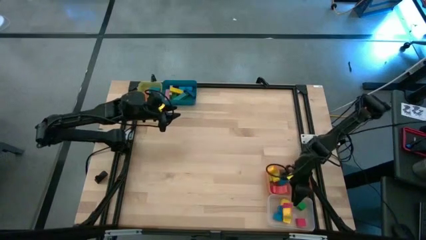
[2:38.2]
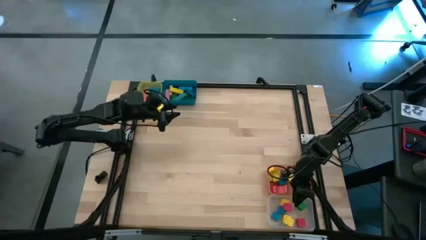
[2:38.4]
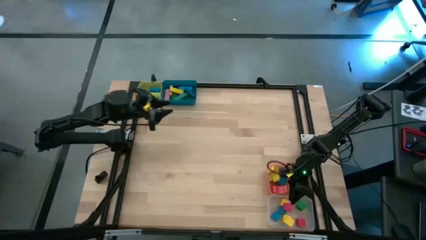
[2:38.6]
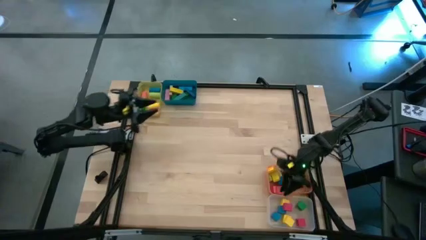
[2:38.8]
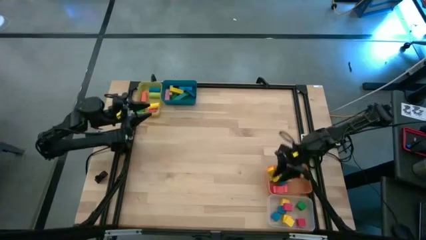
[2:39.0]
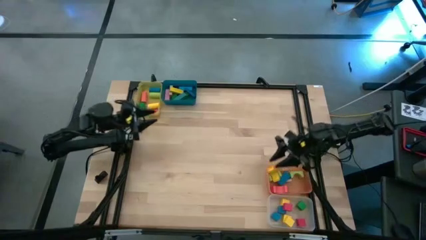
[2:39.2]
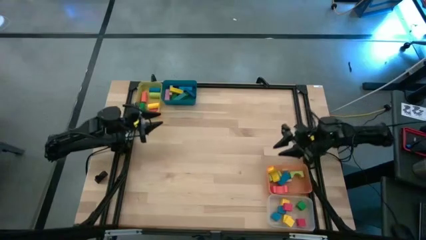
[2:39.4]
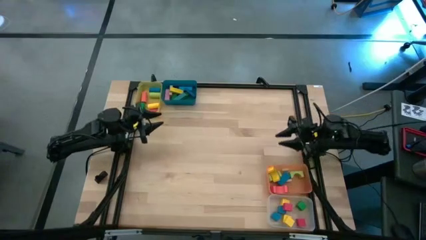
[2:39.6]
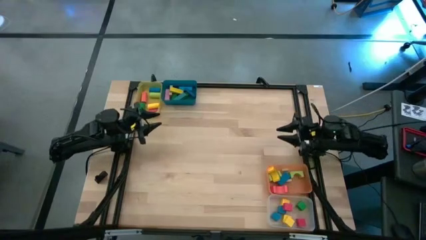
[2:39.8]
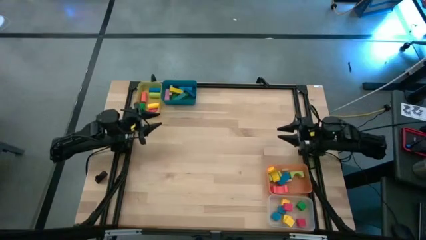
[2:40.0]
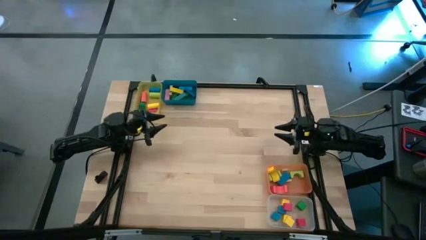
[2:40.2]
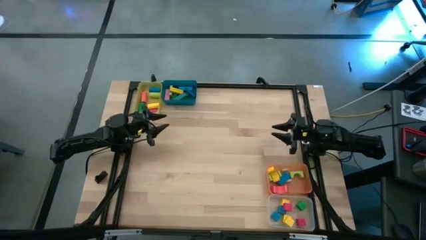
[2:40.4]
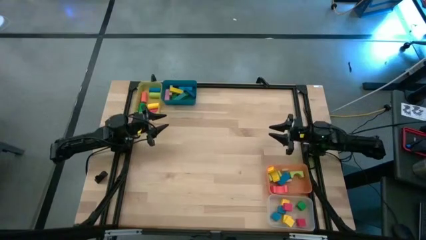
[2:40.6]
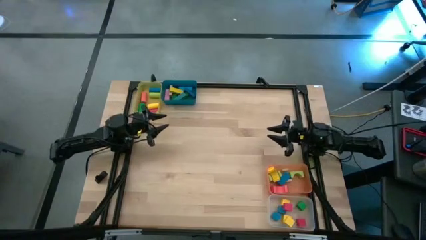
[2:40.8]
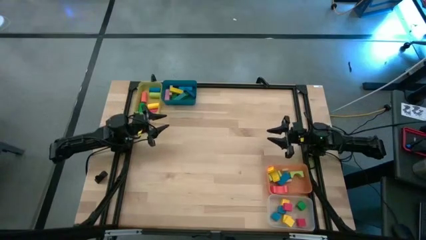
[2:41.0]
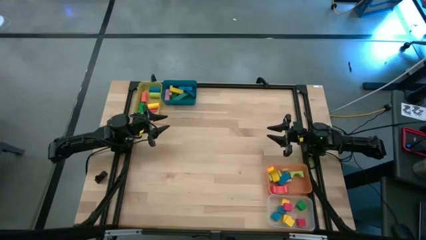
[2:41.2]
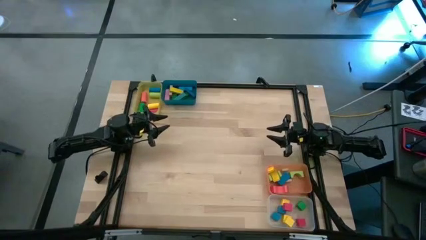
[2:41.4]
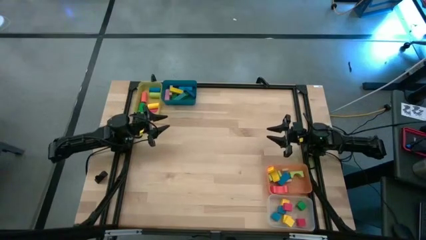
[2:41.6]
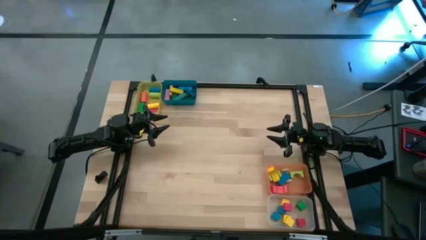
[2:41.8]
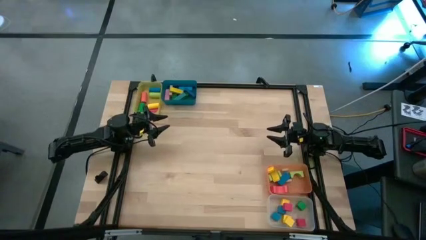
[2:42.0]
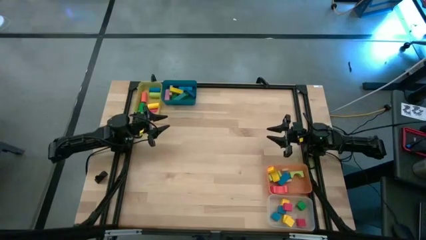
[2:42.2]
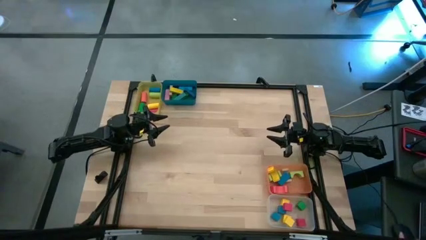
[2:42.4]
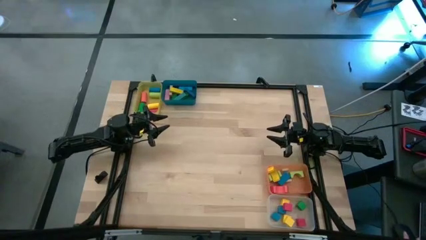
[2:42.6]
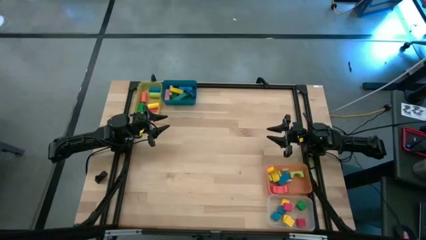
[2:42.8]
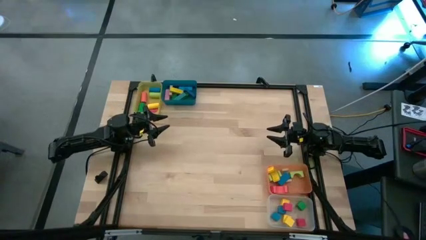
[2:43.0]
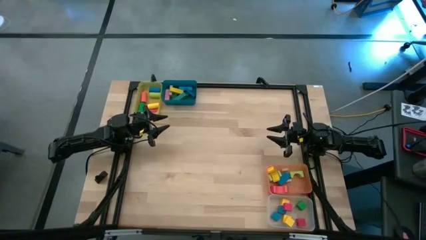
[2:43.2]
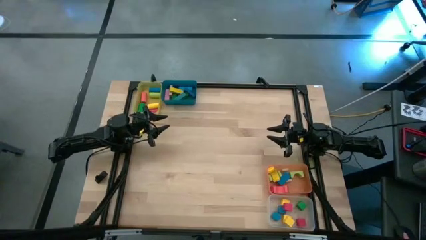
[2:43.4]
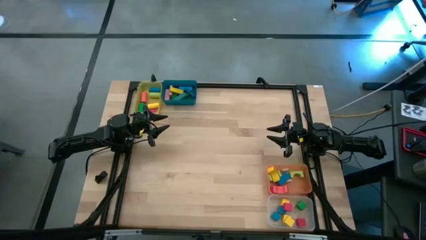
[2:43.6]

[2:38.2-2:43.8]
Task: Sort blocks by size
Return to Home Position

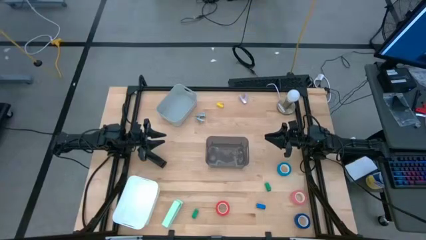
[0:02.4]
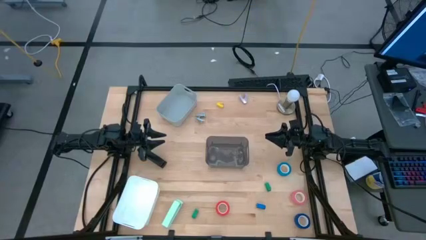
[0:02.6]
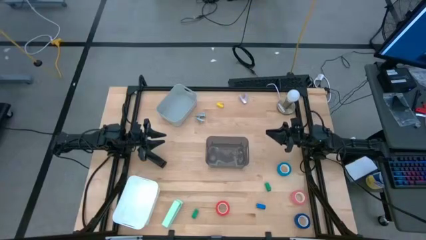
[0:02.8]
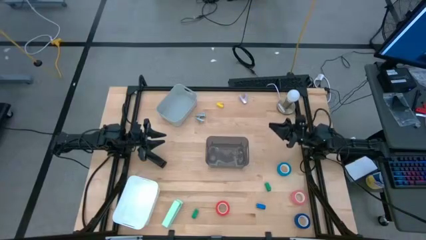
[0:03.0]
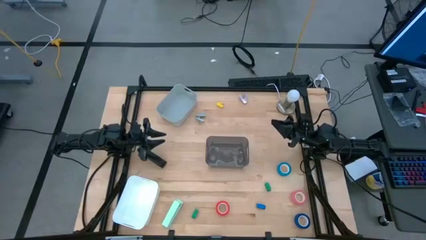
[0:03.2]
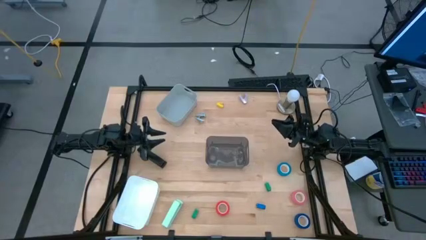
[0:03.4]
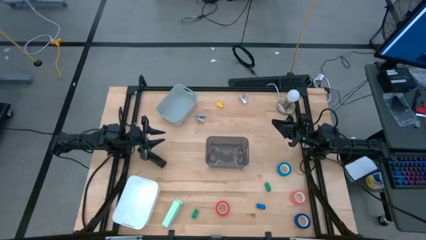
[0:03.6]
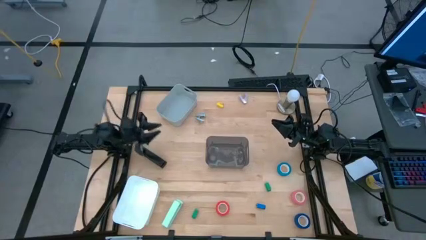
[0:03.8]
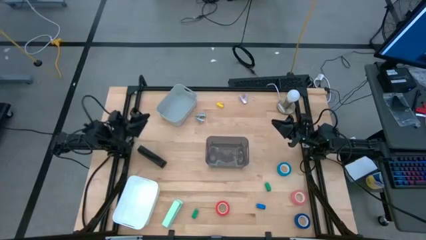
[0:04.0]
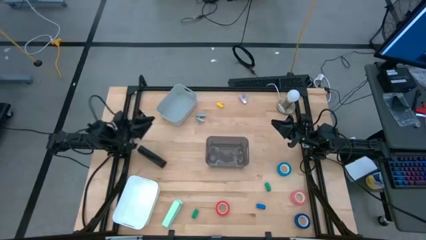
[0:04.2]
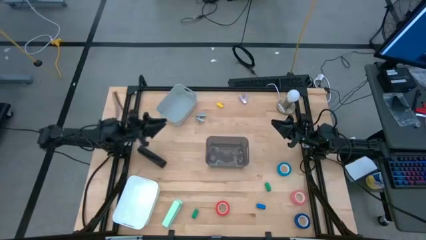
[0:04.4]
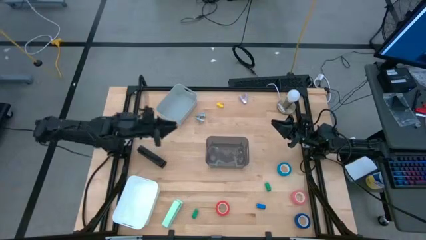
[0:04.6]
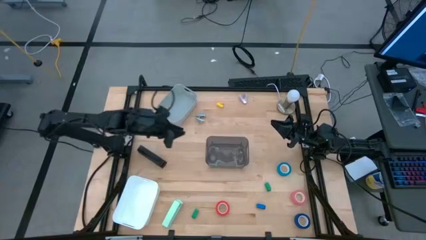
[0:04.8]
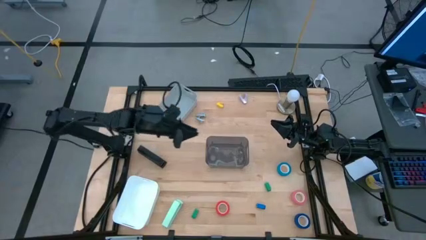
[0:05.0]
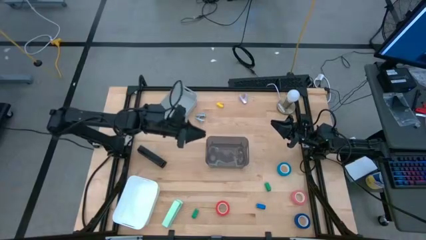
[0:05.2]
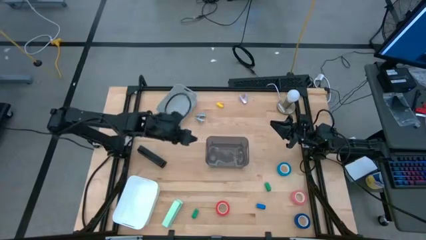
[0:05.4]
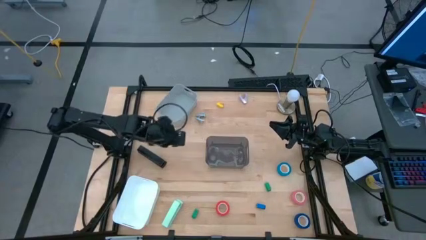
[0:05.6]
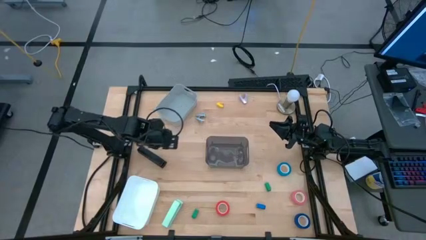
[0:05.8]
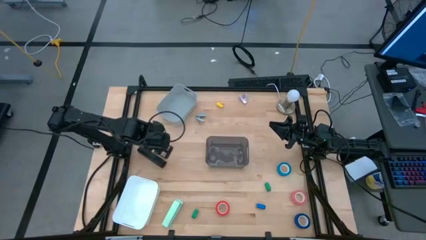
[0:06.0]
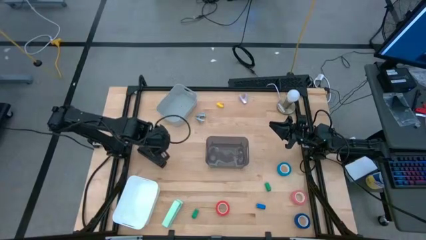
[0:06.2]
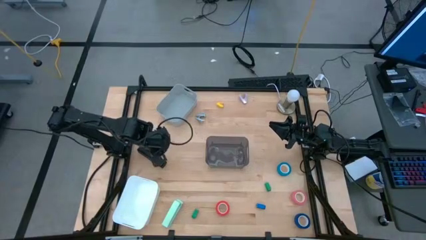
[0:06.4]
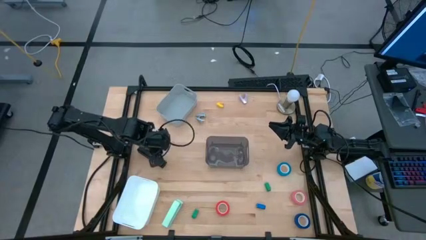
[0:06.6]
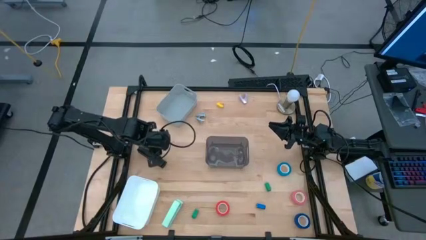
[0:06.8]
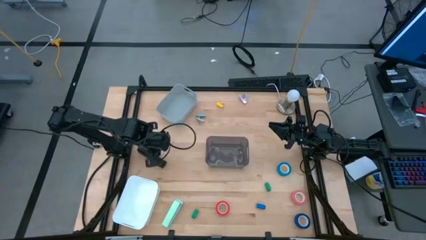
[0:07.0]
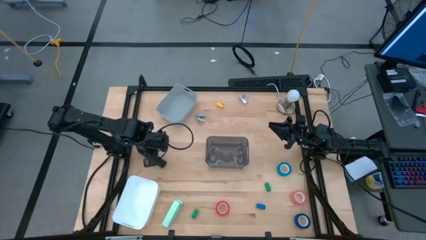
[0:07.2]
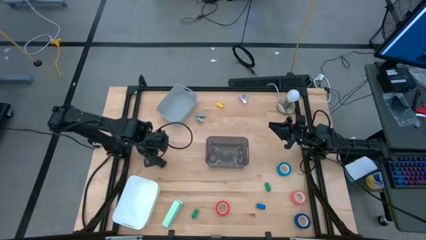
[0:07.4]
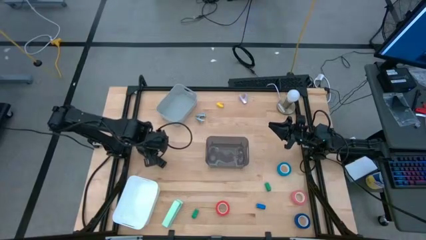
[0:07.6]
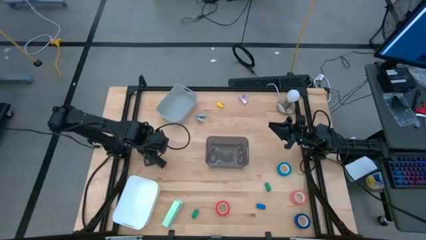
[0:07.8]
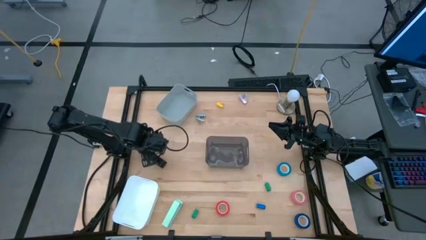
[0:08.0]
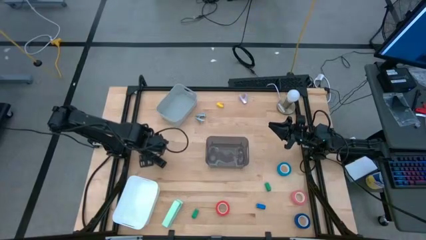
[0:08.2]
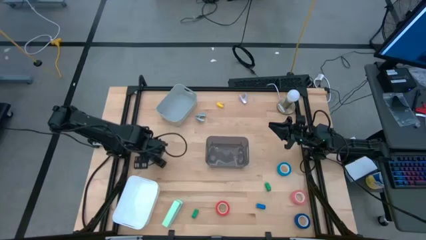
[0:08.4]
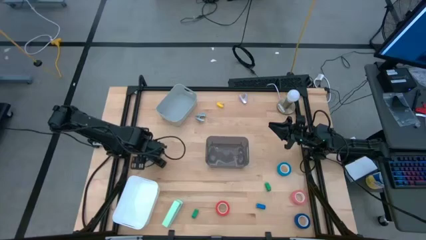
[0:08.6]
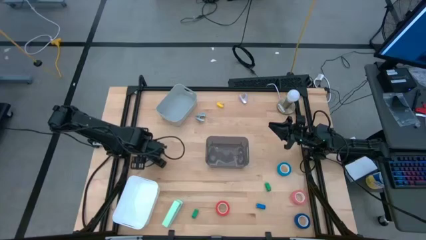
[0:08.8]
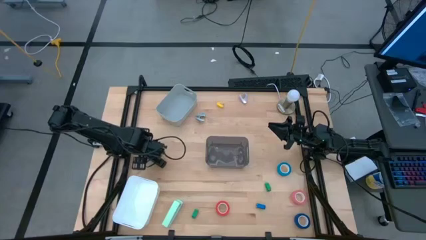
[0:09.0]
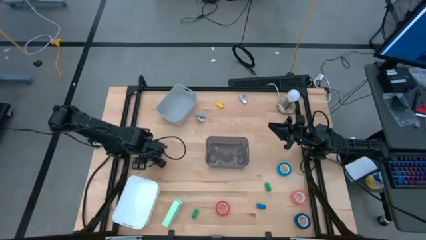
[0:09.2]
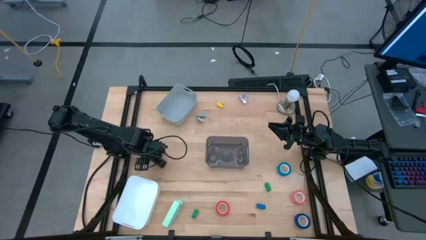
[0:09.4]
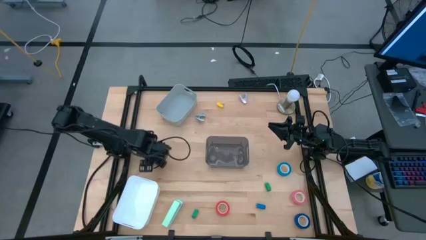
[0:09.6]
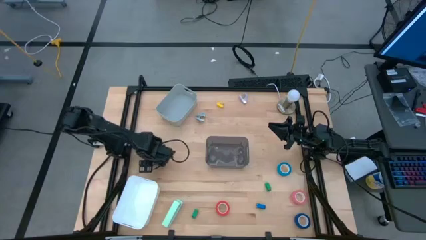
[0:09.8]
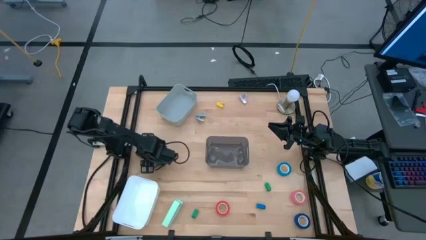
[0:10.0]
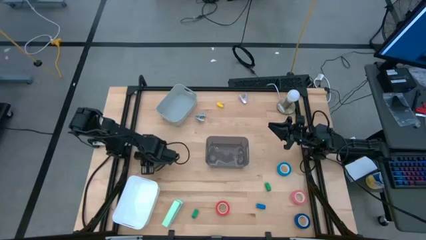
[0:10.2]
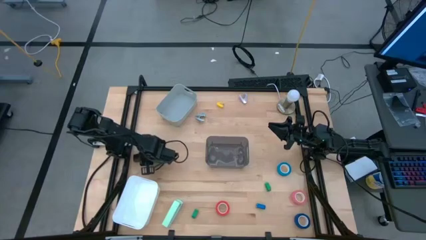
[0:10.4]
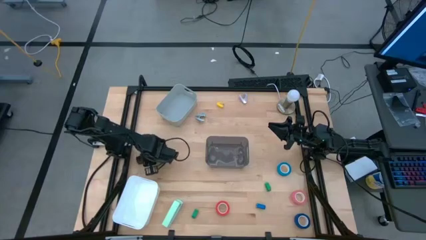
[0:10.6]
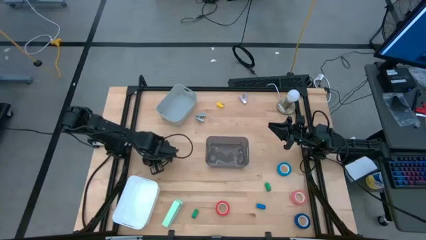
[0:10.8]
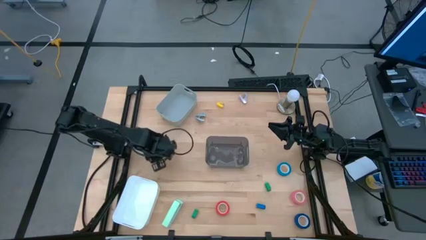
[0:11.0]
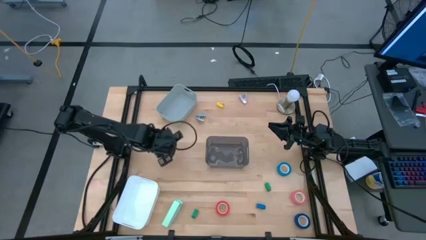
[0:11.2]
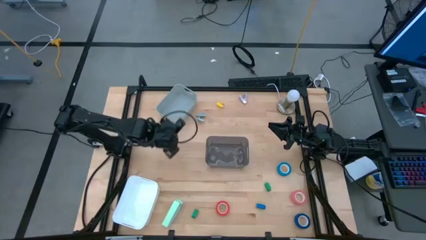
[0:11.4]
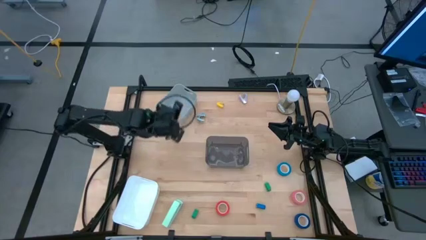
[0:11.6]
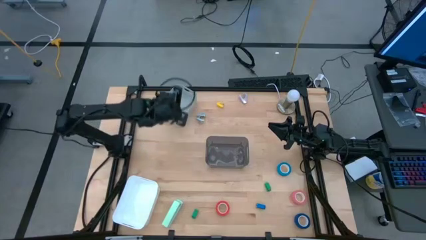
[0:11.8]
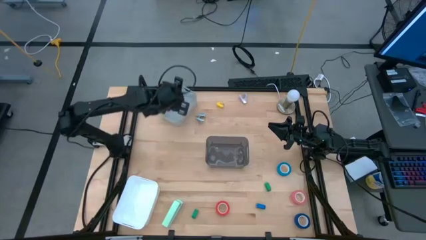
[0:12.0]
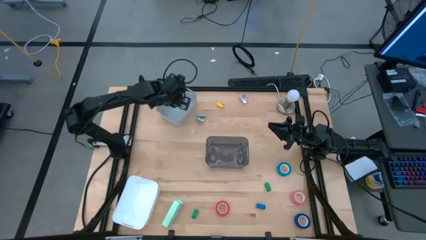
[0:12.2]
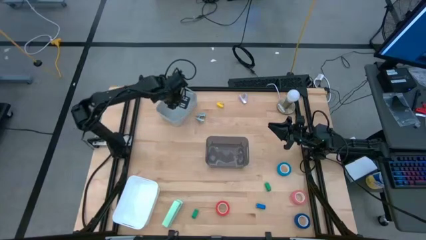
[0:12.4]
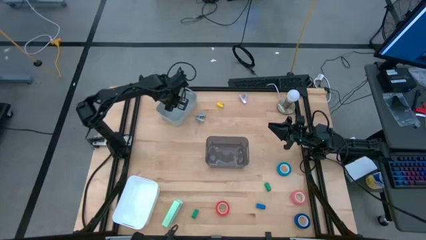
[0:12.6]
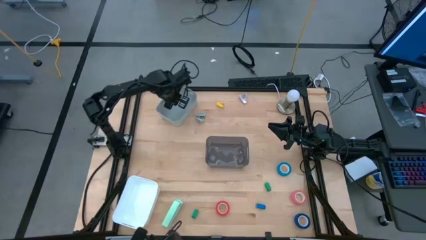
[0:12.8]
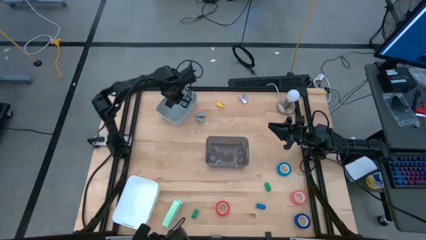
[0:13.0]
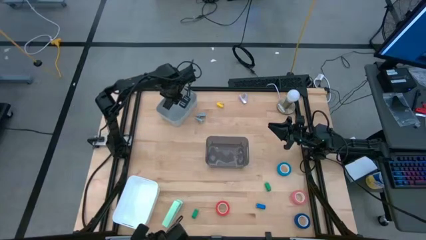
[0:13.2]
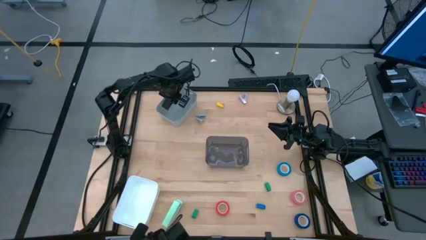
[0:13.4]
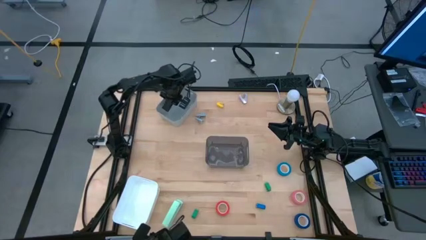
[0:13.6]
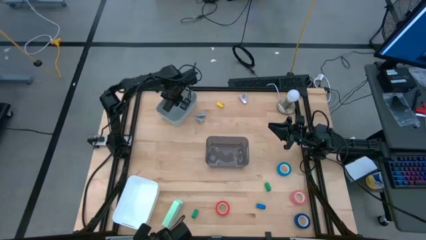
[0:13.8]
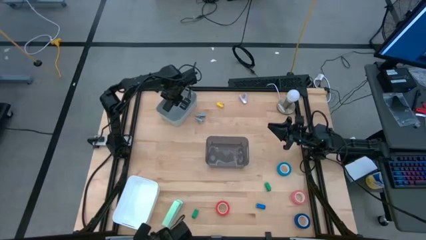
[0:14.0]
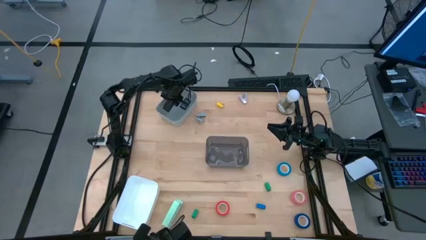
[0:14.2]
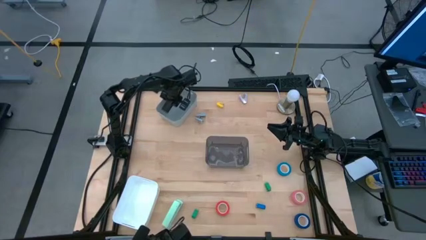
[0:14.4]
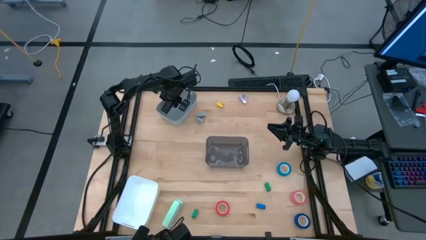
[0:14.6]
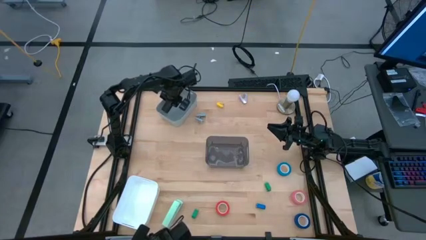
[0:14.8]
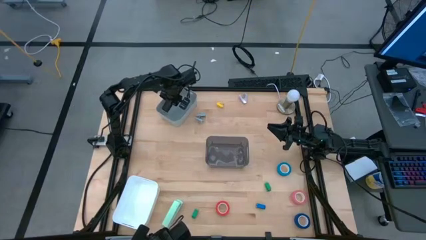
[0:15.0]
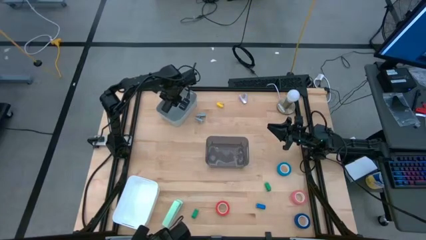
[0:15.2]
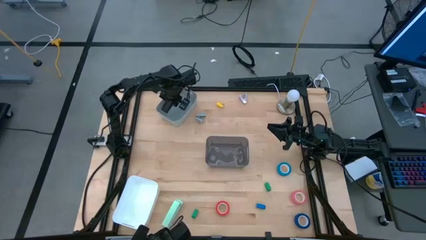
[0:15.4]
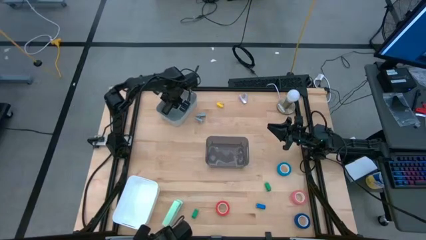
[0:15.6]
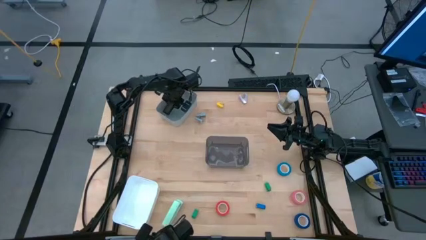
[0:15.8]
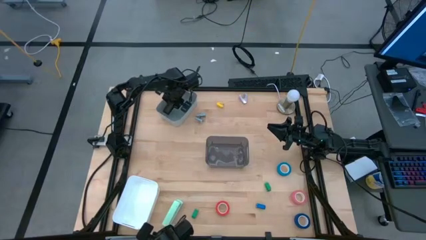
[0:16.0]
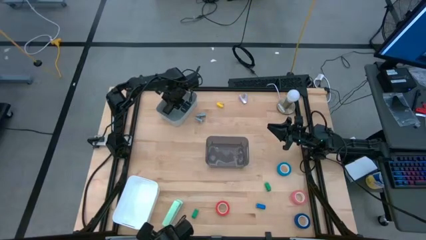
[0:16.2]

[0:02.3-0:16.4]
Task: Pick and place Stapler, Stapler remover, tape
Put the black stapler into the gray bin
